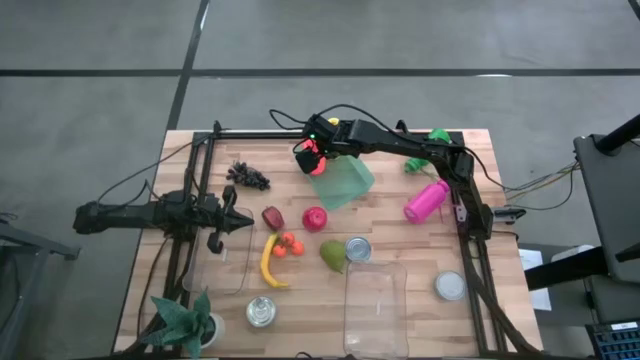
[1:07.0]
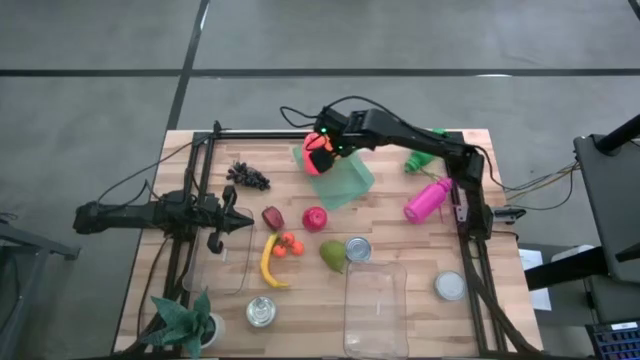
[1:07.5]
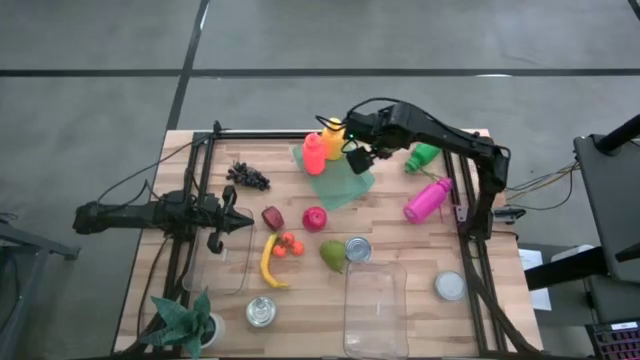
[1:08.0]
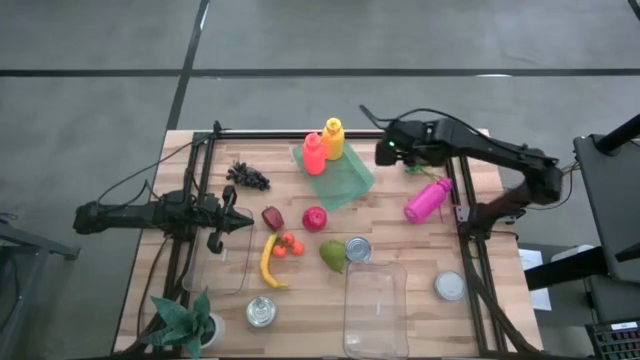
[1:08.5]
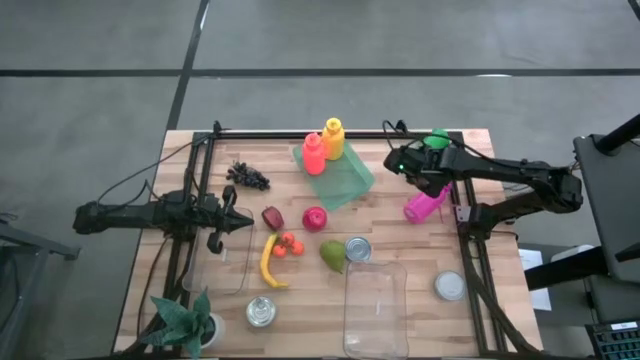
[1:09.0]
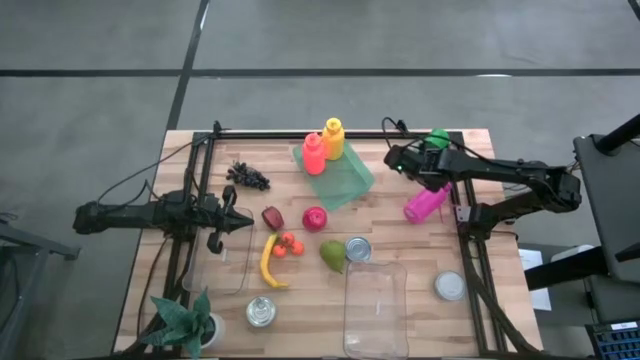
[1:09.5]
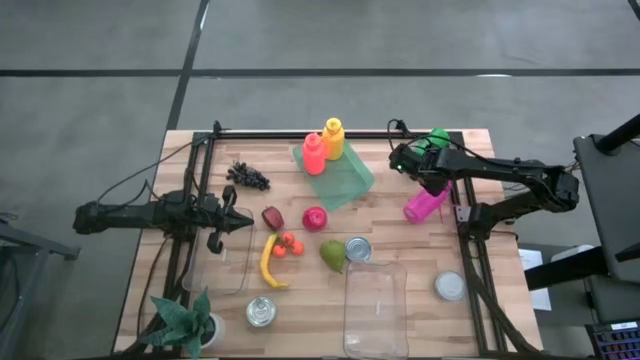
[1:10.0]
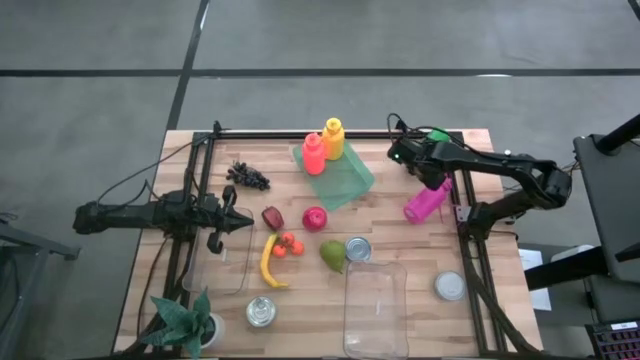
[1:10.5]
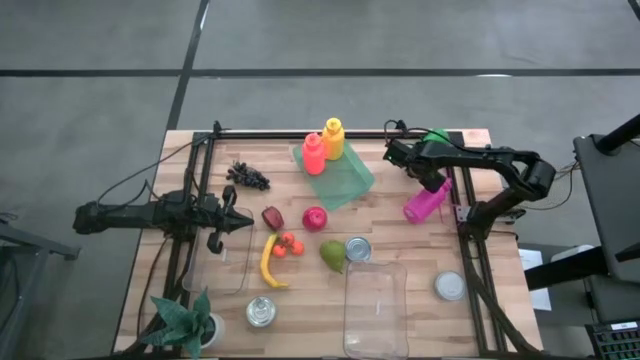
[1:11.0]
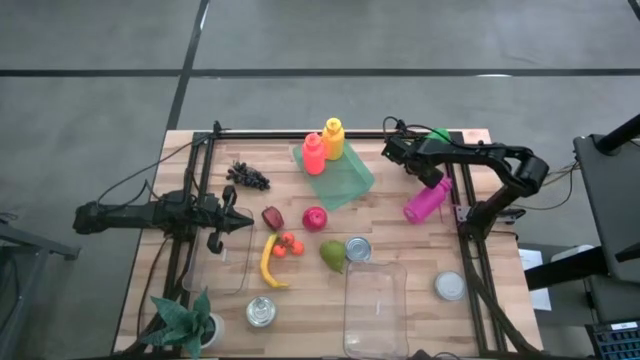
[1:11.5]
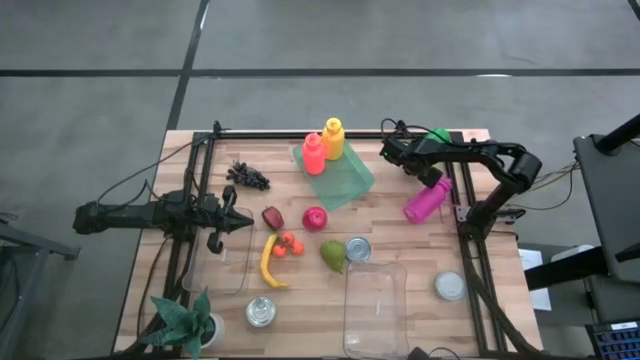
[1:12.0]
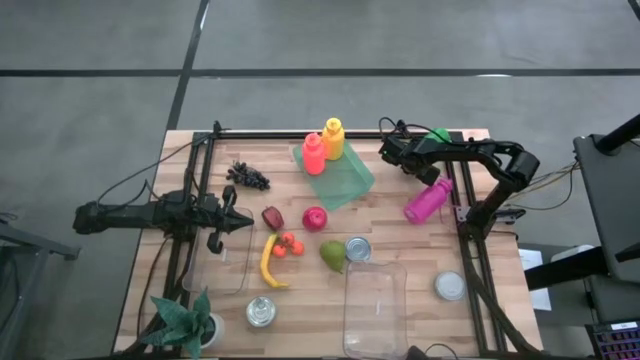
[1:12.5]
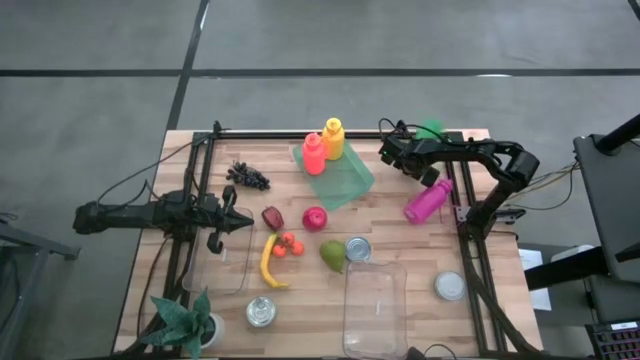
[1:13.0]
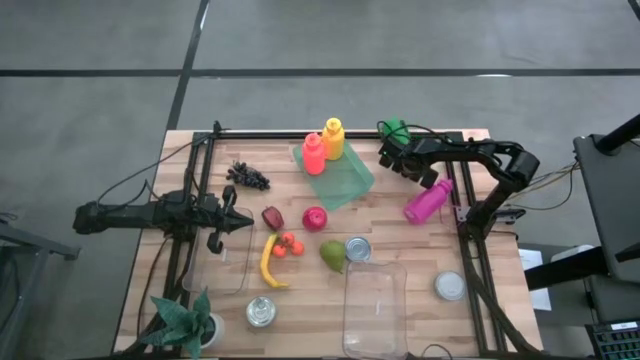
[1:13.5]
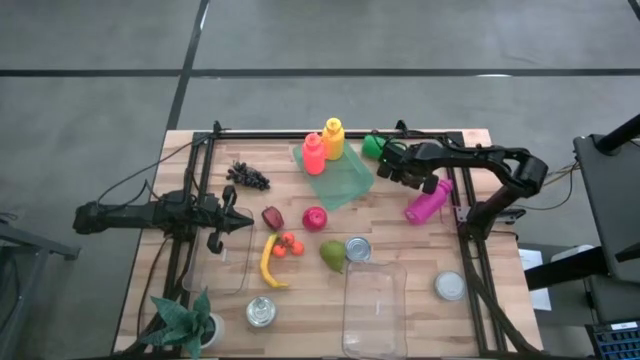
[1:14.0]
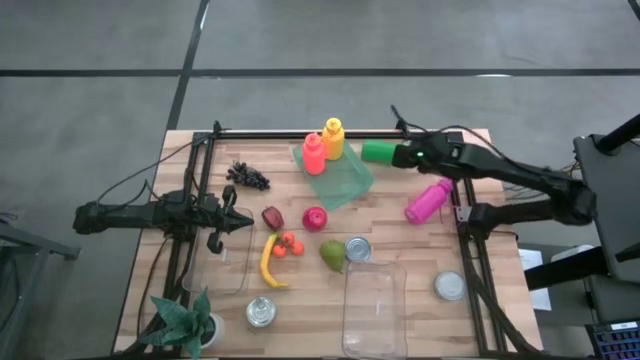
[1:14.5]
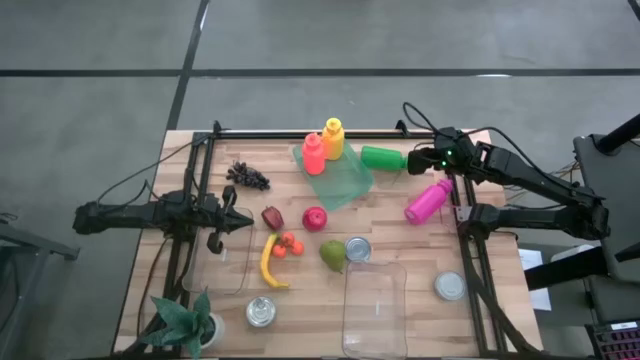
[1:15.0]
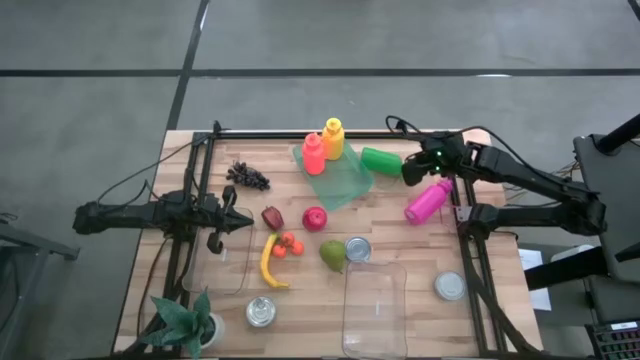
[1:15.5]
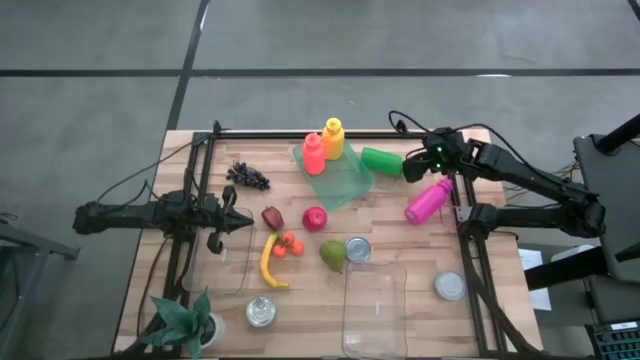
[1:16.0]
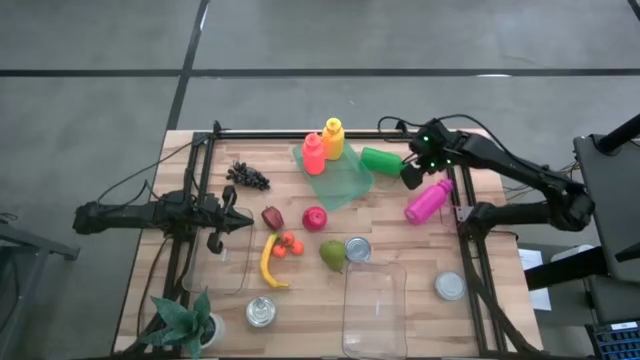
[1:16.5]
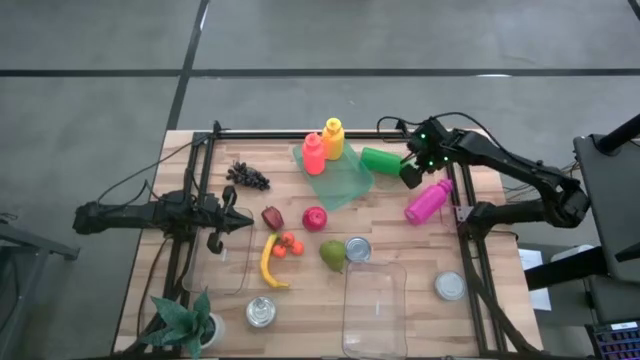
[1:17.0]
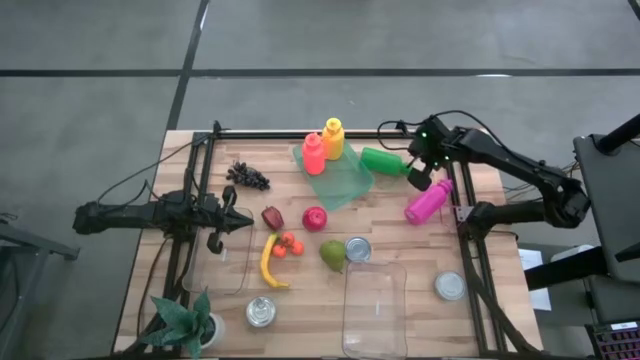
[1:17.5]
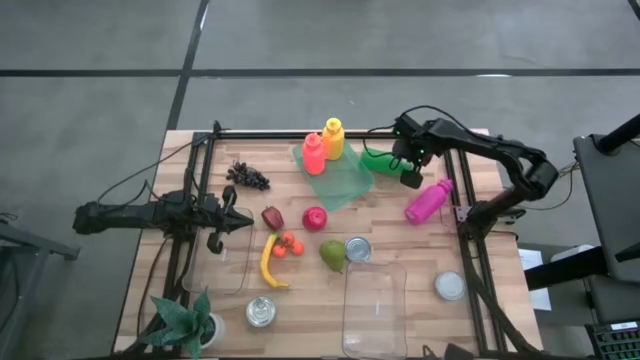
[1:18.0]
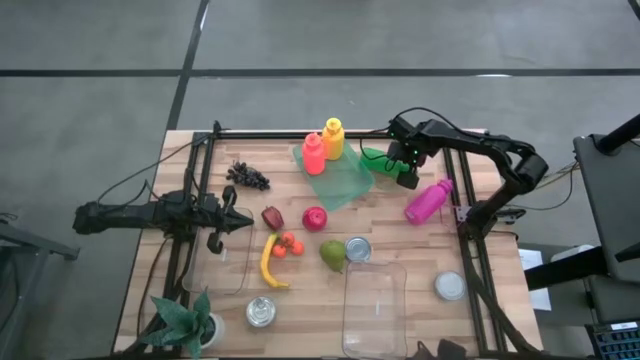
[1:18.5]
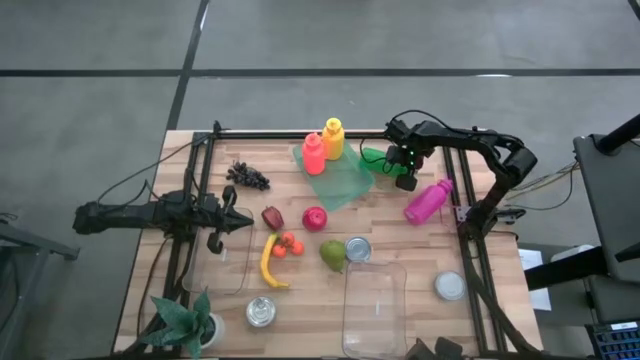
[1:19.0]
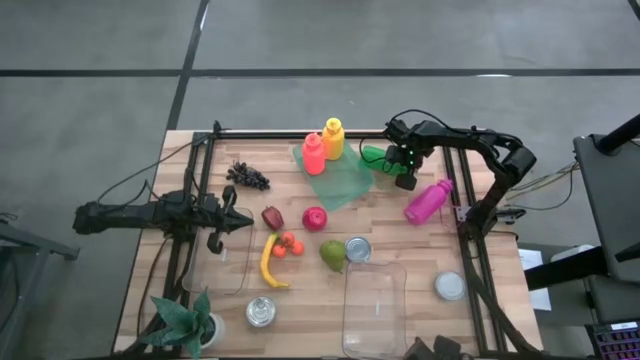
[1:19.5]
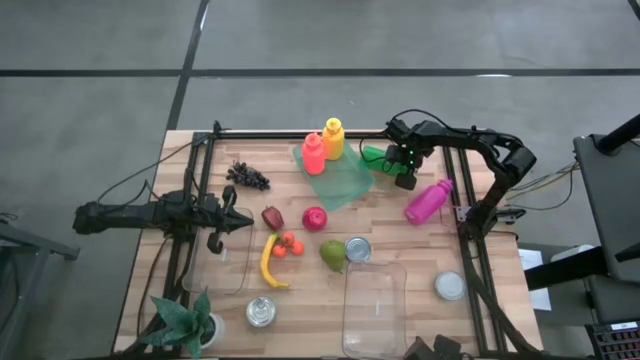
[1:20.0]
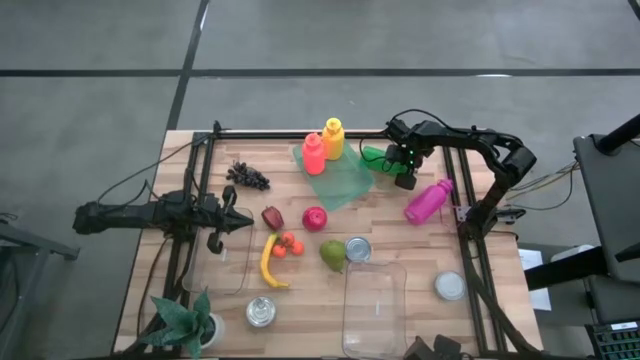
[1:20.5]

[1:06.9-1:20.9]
Task: Pick & Place Food Item
Put the green water bottle into the green bin

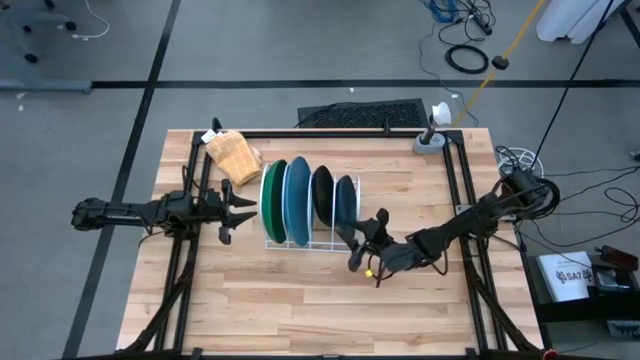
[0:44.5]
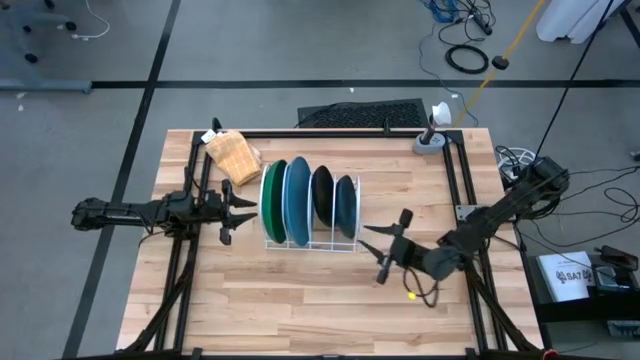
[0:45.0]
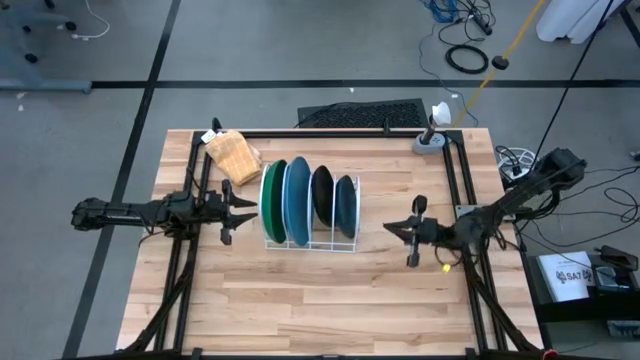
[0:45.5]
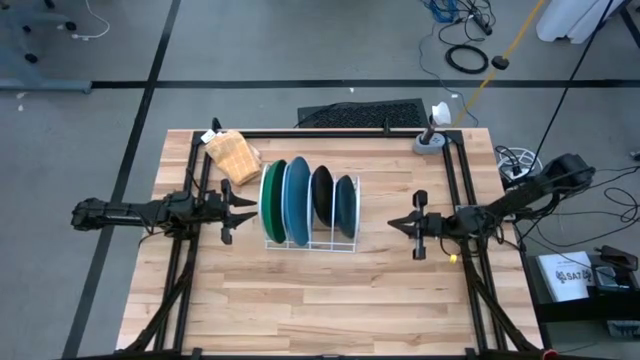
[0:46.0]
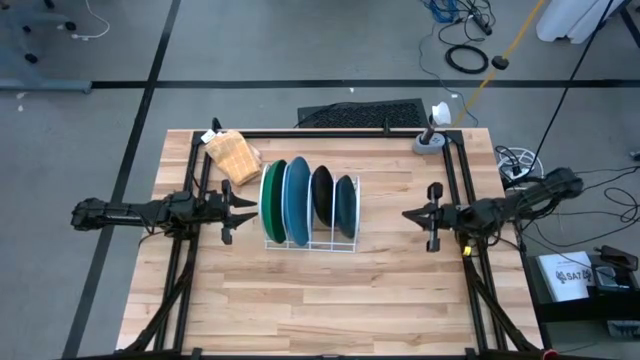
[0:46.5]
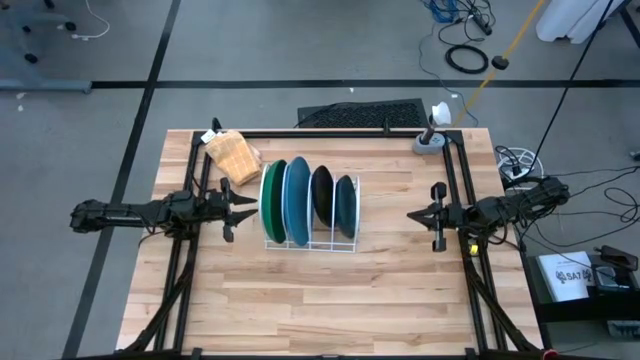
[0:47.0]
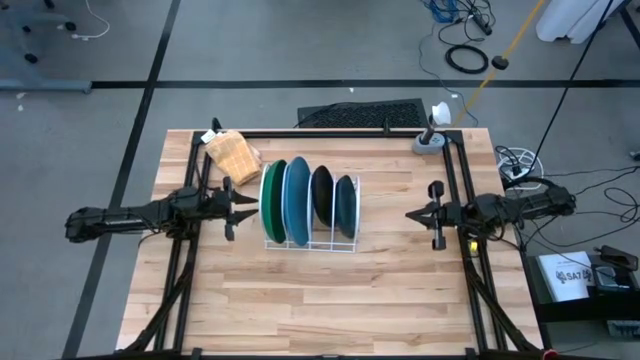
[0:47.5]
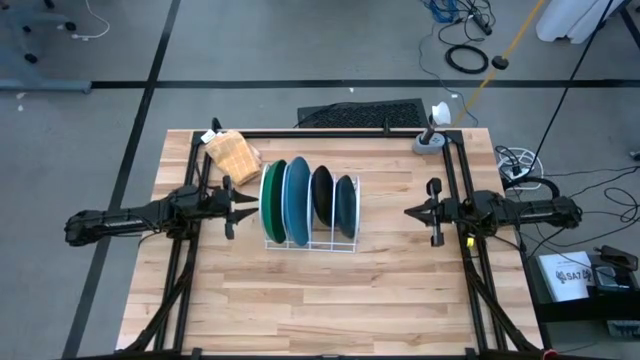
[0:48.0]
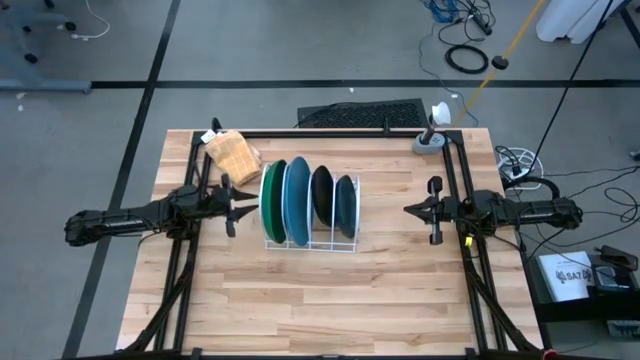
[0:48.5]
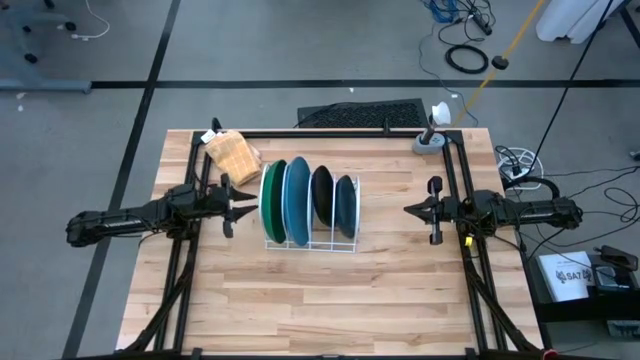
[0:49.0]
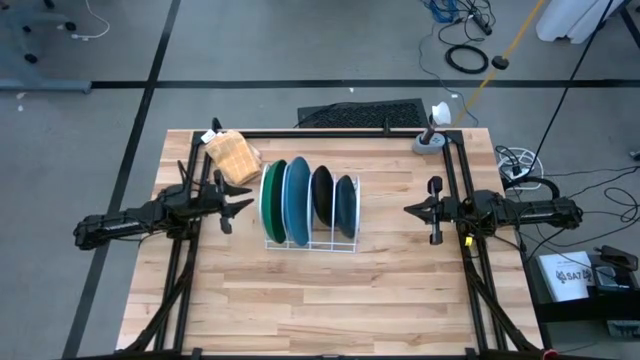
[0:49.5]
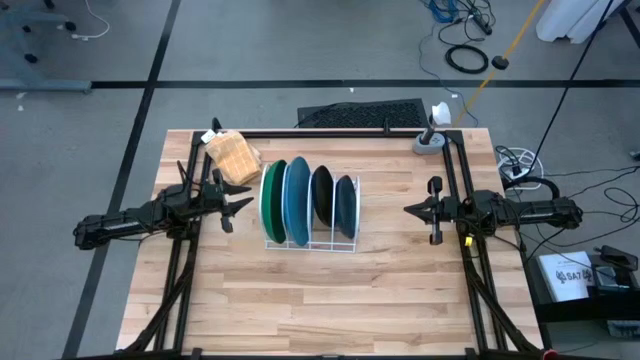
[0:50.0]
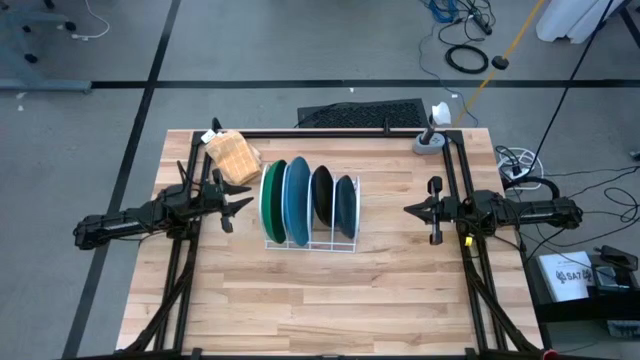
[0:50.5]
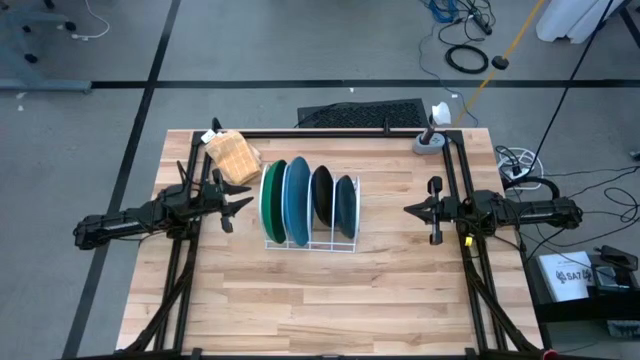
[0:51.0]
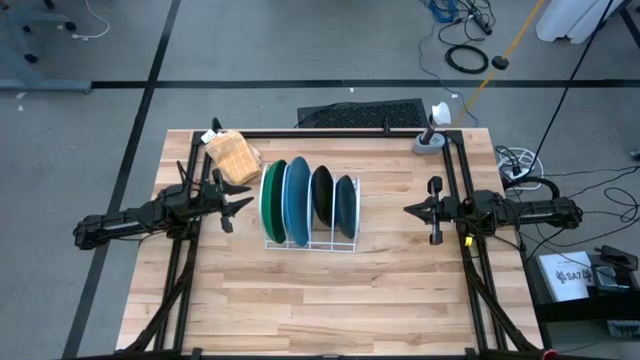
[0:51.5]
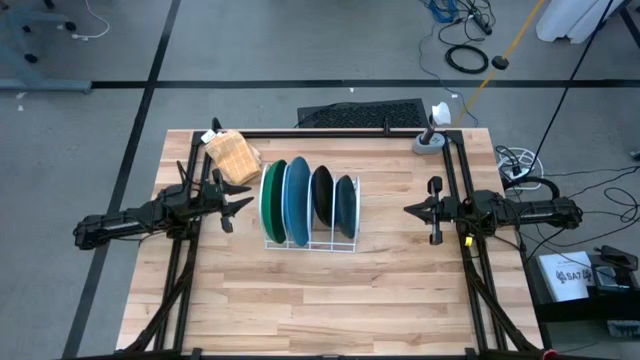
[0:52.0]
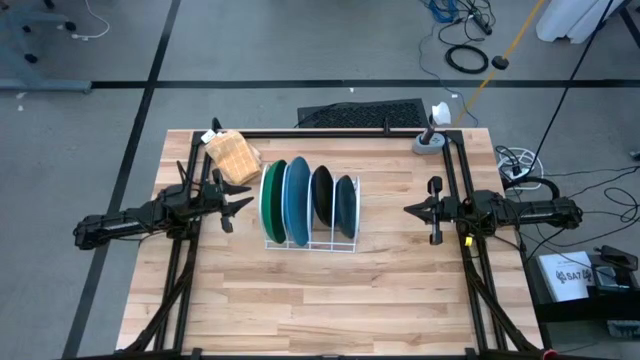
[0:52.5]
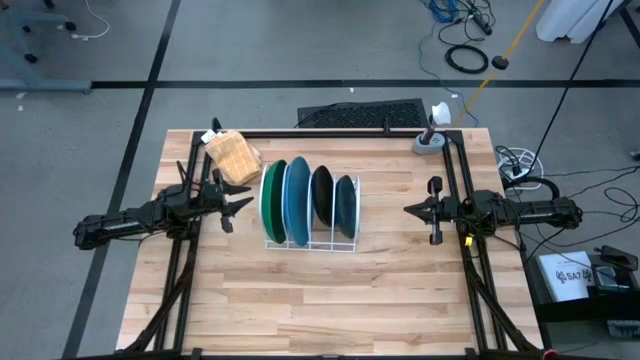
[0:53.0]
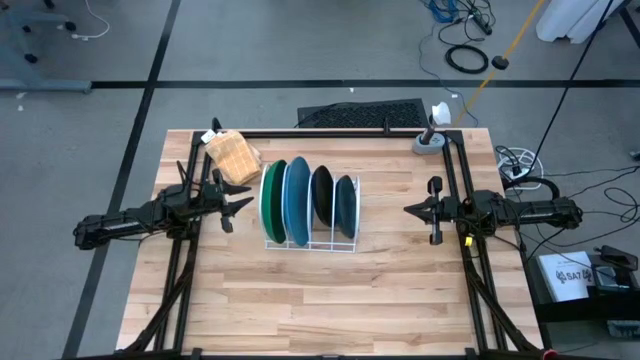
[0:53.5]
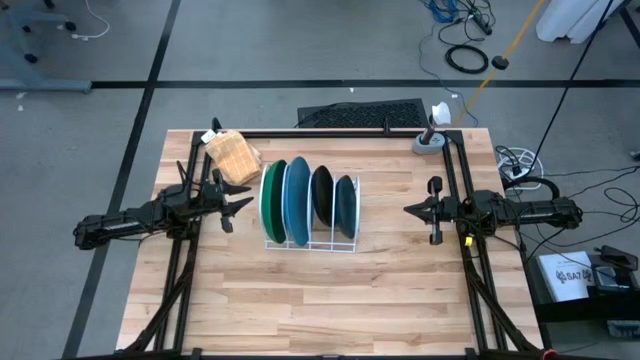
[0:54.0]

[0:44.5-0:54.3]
Task: Sort dishes
Return to Home Position
